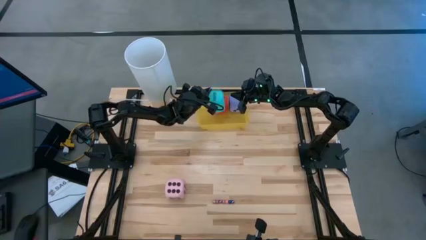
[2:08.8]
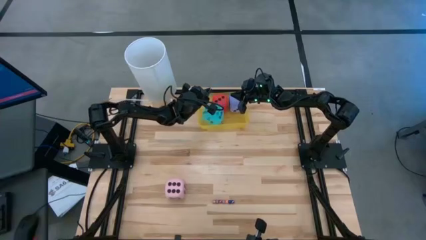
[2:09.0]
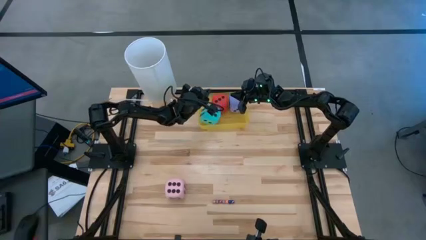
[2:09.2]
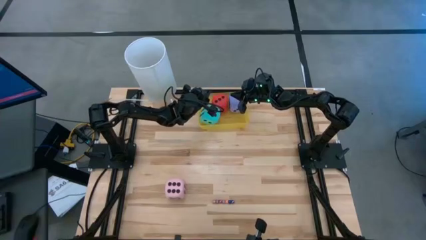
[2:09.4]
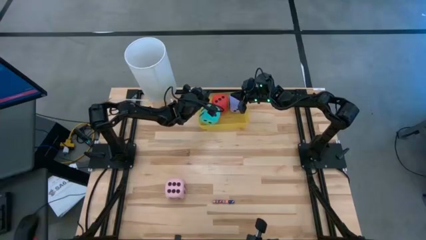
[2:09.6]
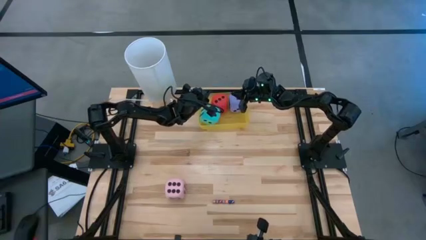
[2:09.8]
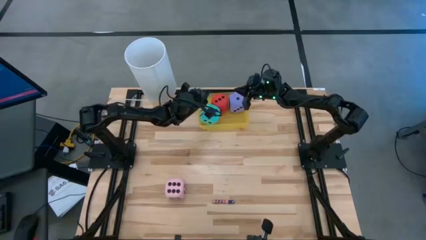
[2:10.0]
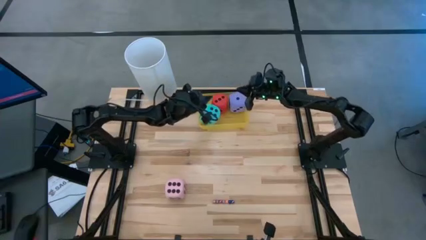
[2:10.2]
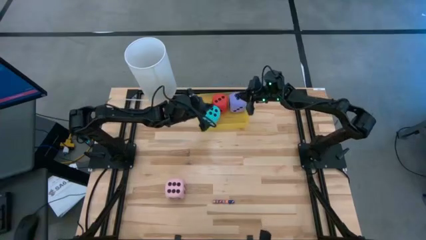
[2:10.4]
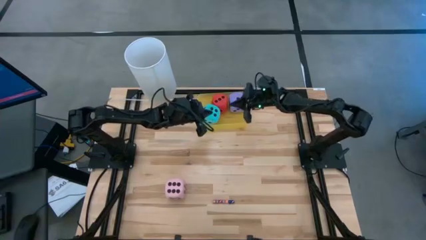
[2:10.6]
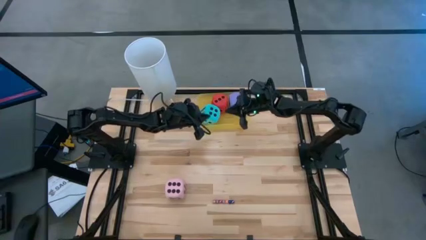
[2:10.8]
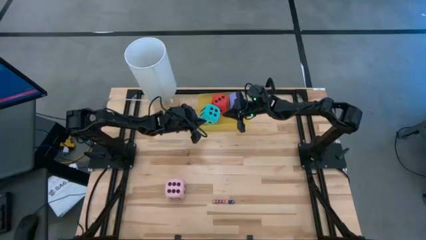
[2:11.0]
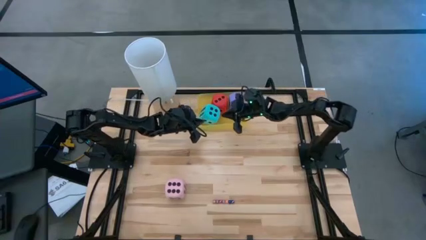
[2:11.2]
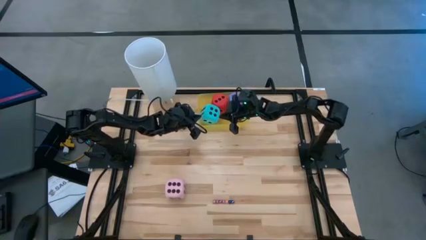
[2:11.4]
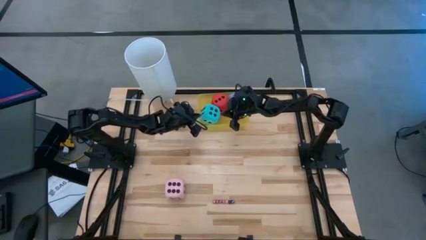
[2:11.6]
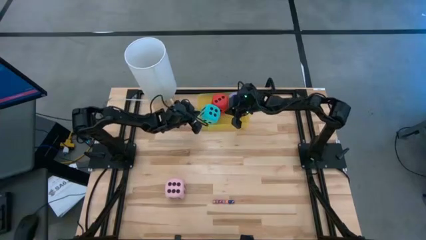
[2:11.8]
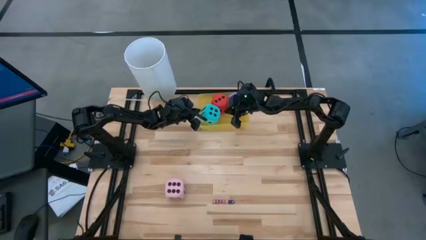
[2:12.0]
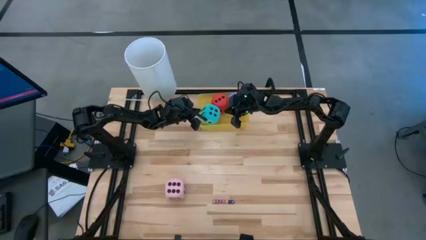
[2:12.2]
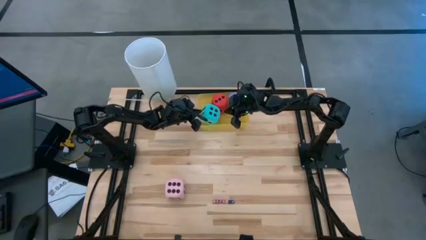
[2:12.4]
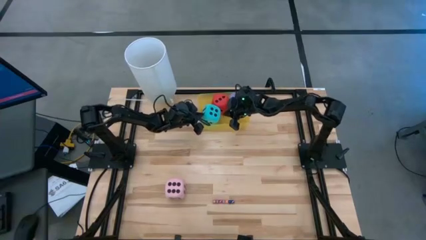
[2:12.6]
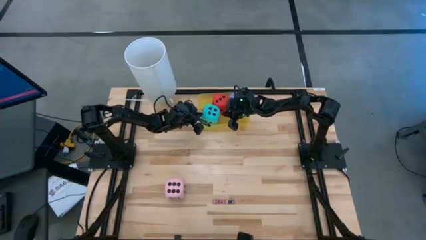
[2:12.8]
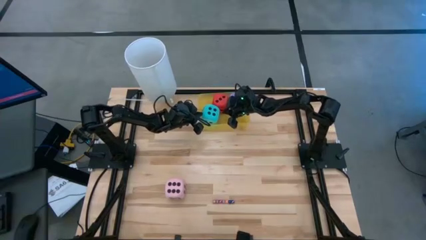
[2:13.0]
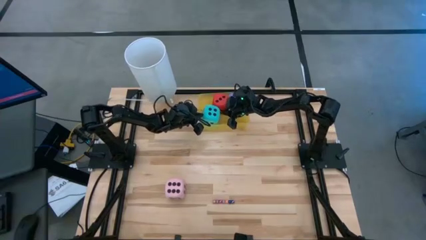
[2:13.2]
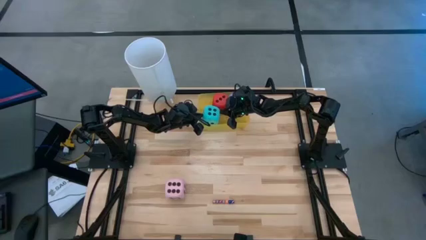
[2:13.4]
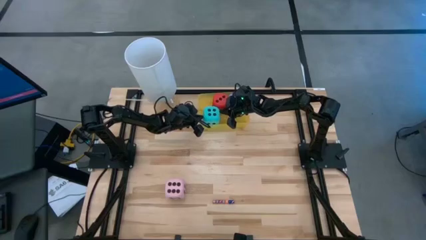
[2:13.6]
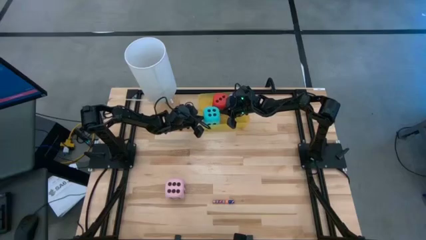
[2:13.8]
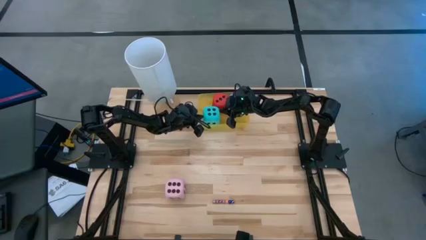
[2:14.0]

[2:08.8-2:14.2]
Task: Pick & Place Dice
Adjust the big light blue dice in the yellow bin

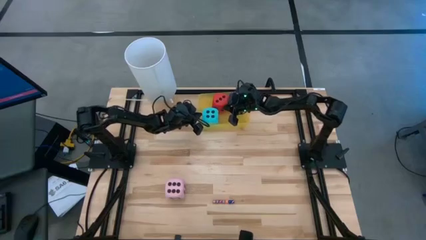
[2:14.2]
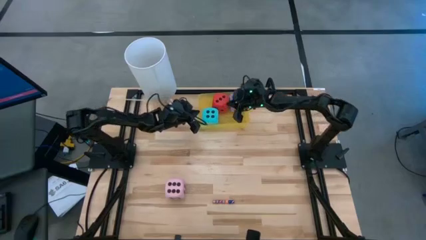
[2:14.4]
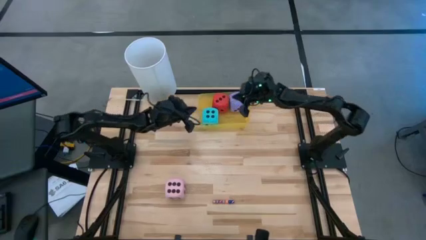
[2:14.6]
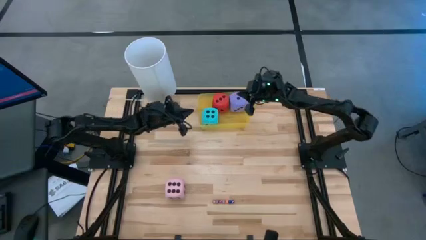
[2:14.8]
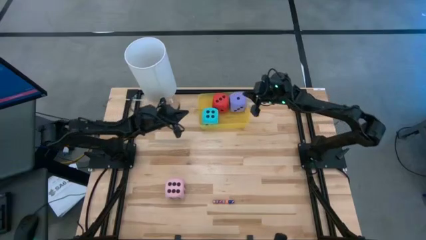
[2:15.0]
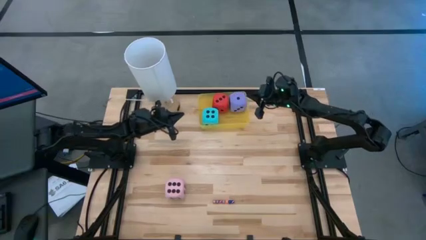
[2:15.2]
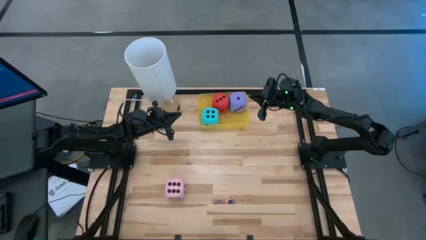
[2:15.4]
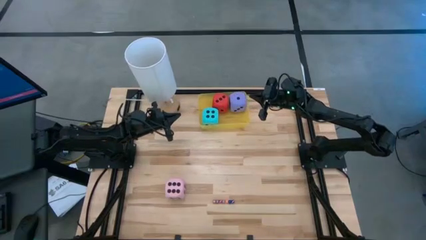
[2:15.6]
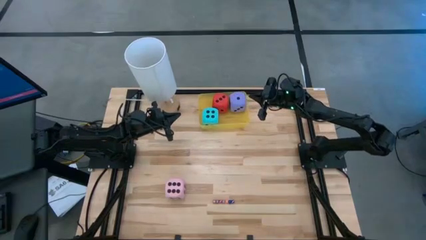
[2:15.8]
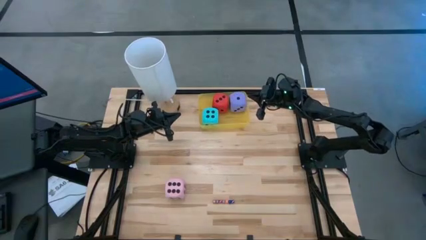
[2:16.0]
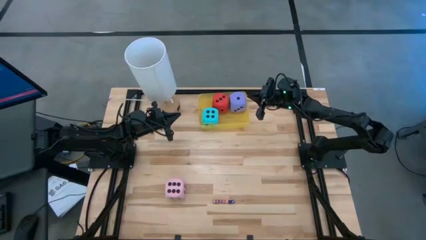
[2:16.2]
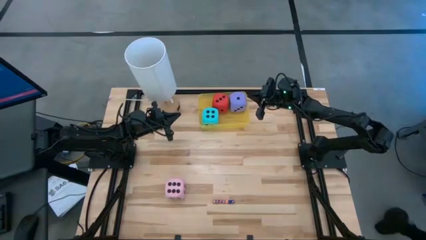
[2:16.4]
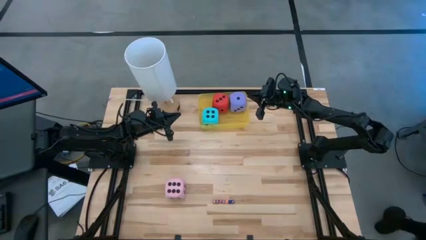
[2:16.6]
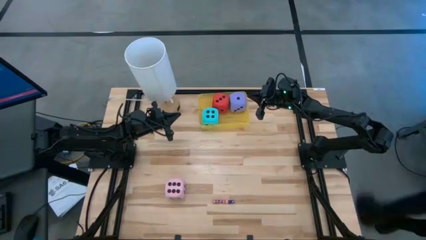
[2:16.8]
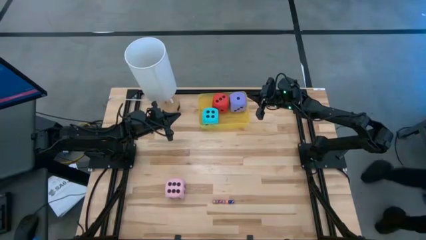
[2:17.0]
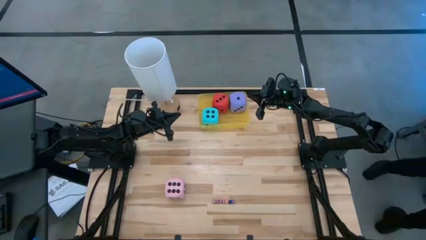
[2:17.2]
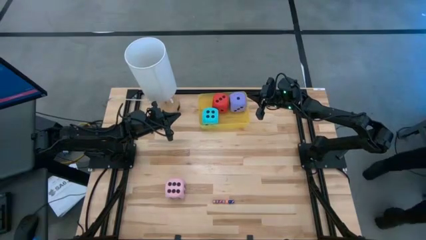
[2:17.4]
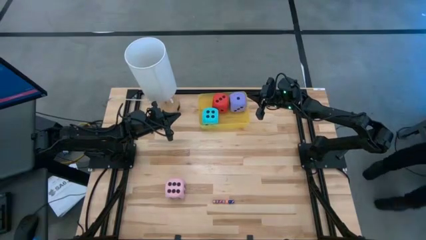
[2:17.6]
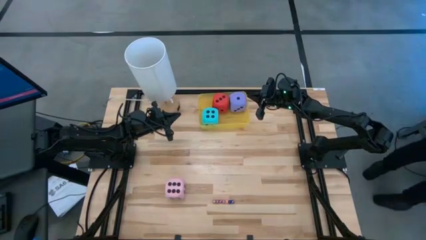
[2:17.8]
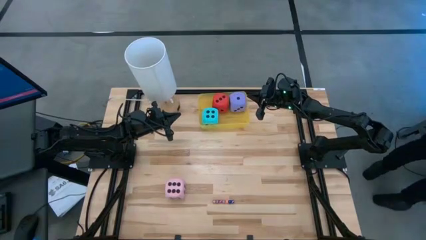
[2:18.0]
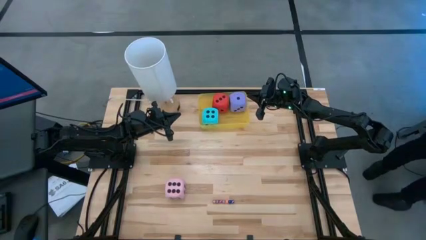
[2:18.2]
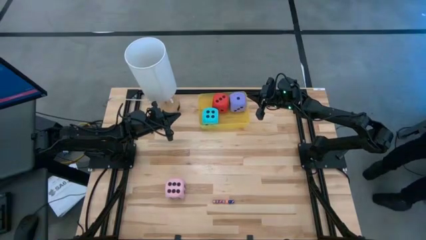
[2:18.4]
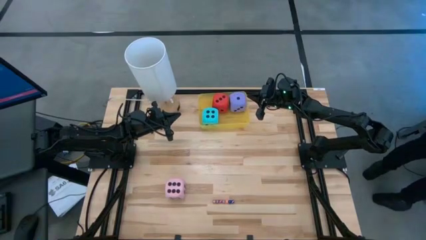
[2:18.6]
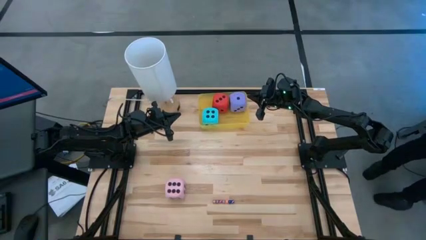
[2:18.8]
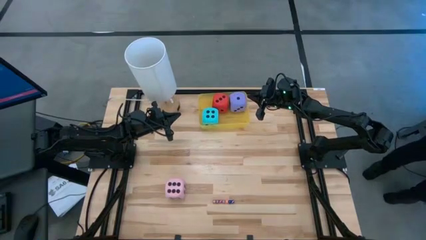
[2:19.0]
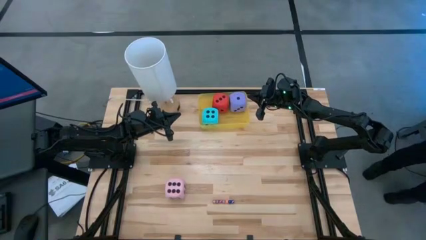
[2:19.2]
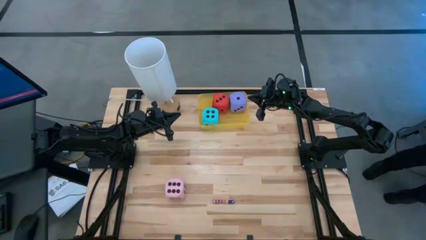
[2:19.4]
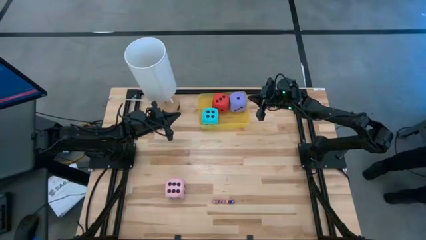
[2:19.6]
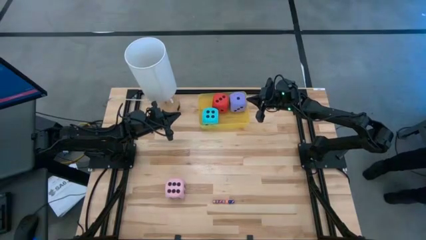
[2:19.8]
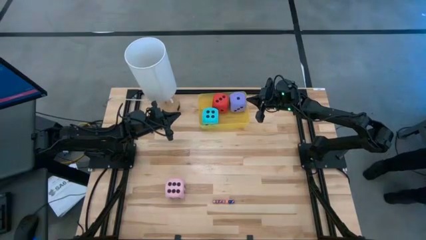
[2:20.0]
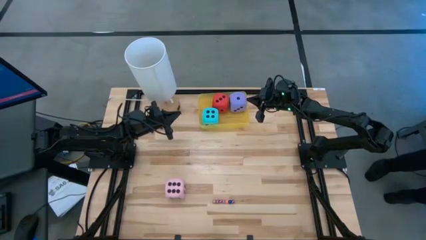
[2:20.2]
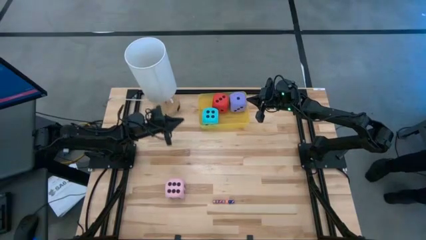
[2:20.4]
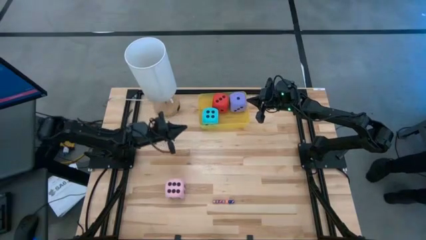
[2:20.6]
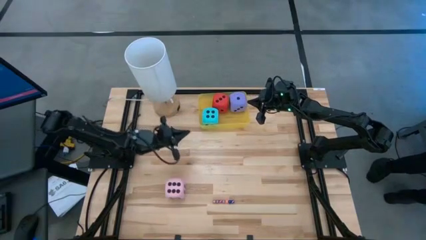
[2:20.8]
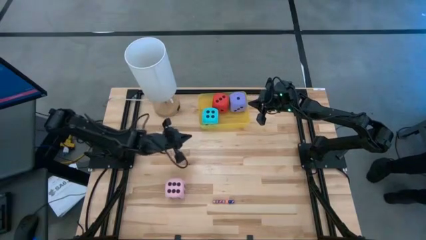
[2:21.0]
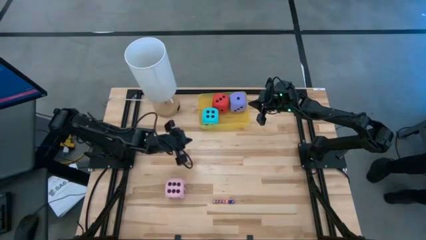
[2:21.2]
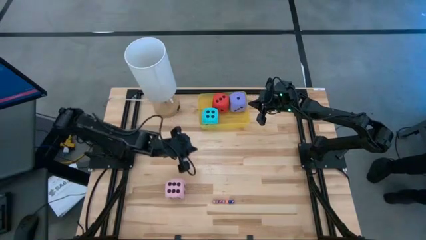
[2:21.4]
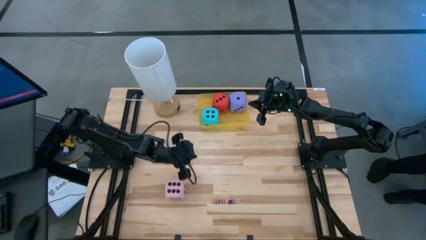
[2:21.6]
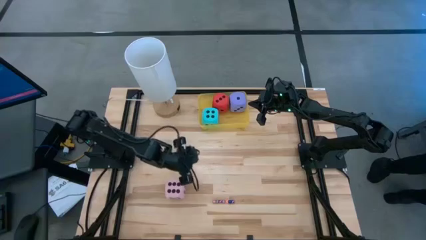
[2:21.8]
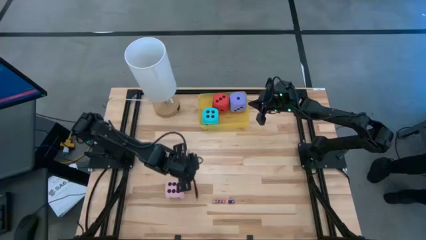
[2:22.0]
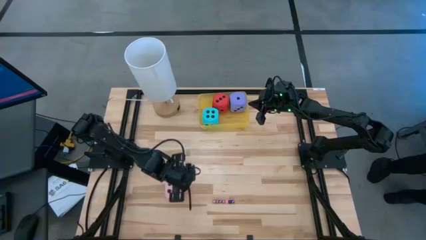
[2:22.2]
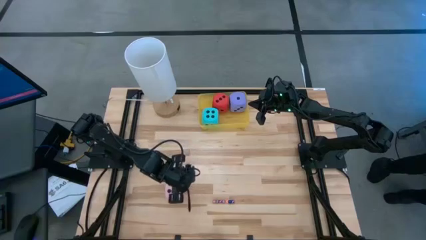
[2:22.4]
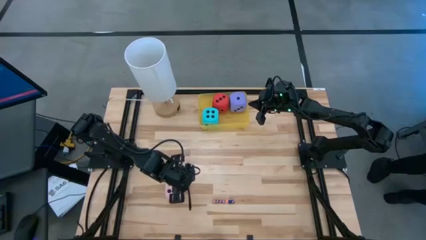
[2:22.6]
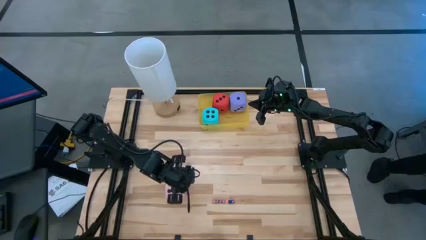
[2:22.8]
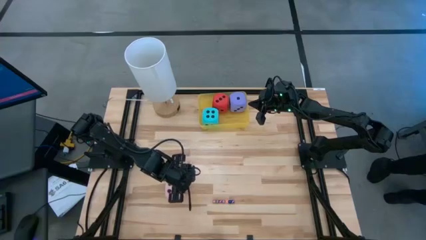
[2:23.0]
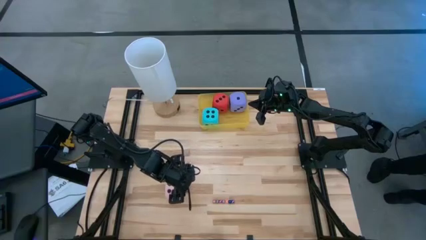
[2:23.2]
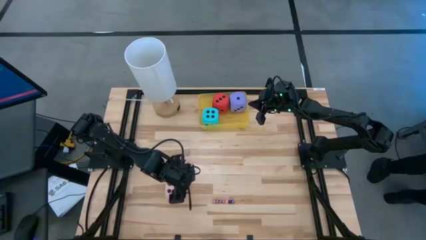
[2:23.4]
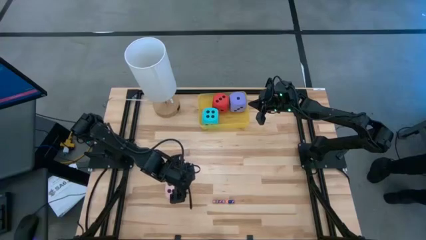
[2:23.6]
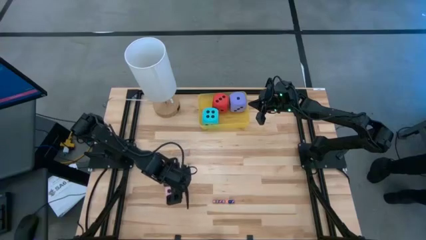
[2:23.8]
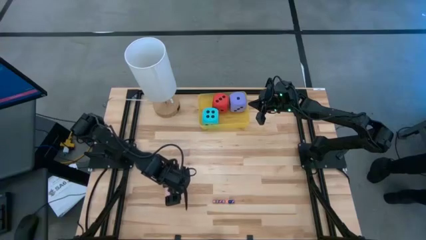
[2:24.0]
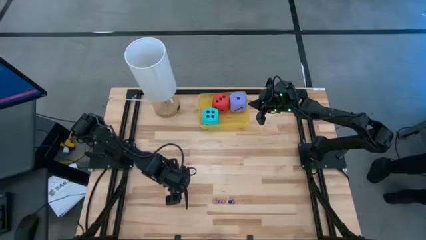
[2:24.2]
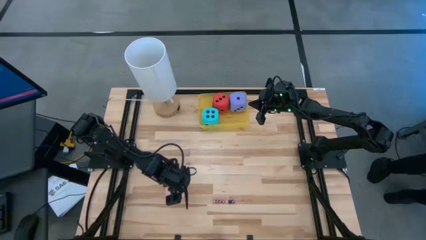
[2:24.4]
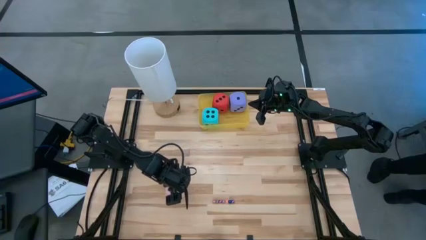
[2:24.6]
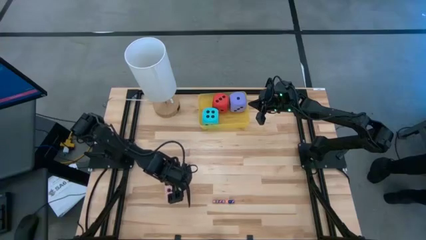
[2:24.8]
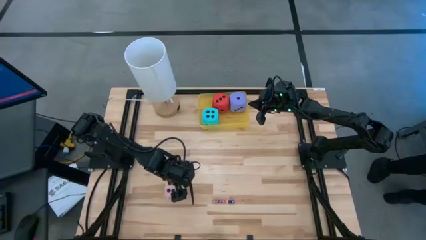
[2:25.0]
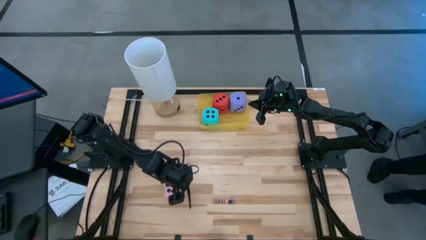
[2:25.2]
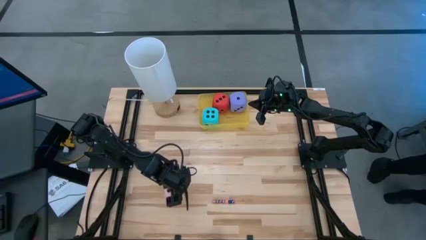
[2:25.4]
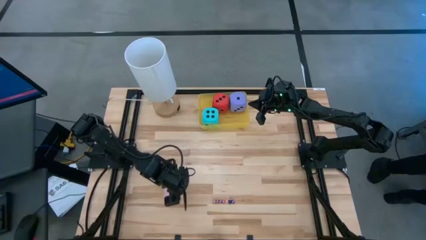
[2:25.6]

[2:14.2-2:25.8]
Put the big pink dice into the yellow bin
